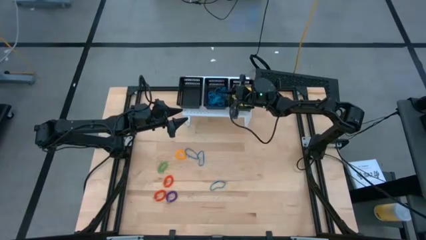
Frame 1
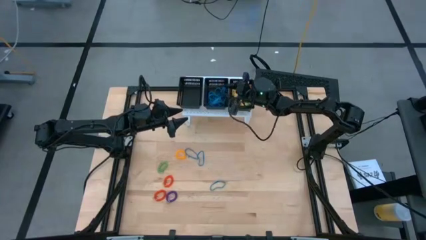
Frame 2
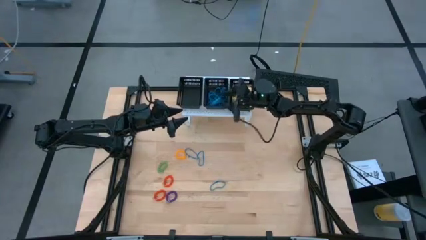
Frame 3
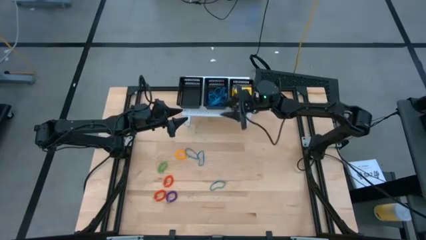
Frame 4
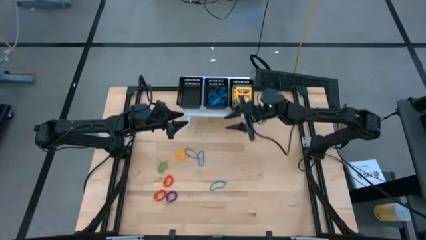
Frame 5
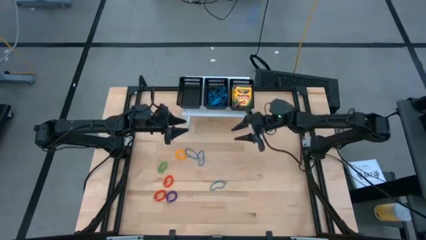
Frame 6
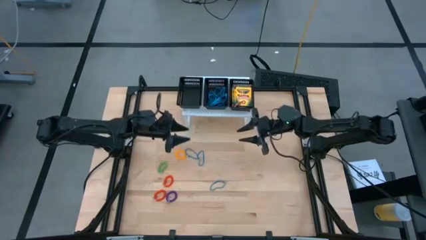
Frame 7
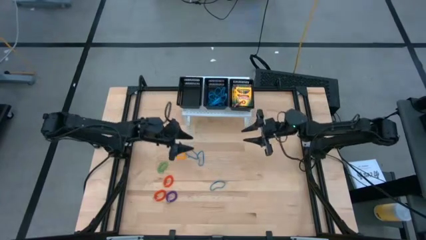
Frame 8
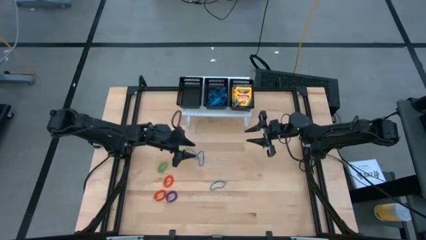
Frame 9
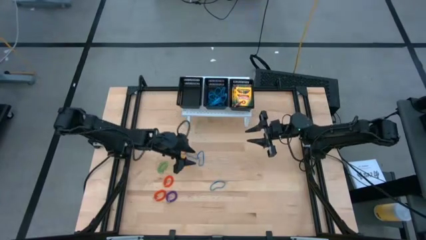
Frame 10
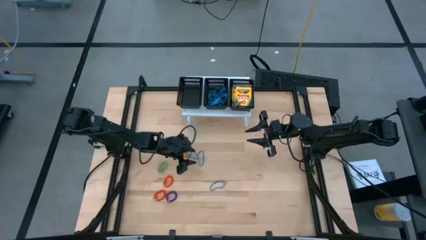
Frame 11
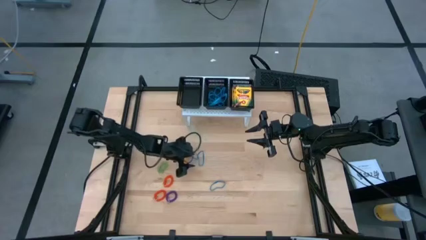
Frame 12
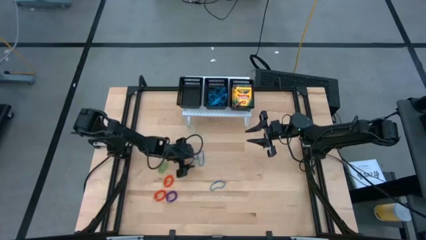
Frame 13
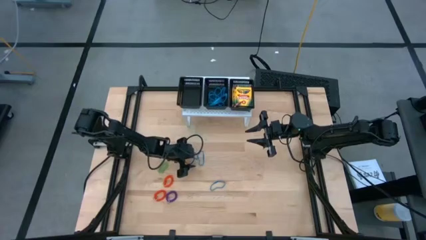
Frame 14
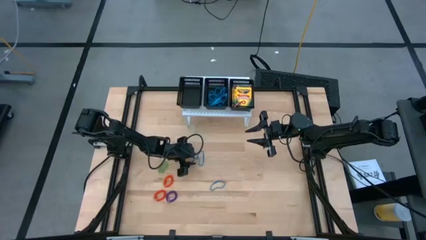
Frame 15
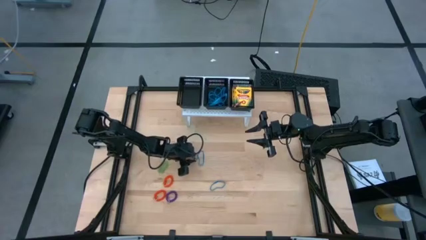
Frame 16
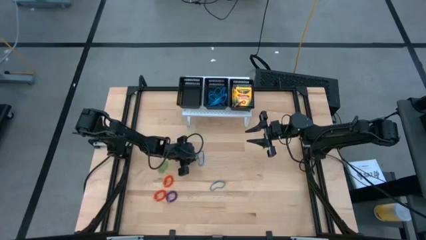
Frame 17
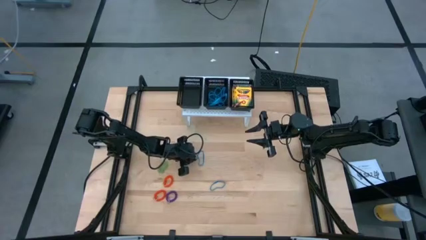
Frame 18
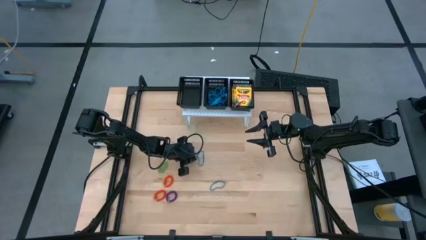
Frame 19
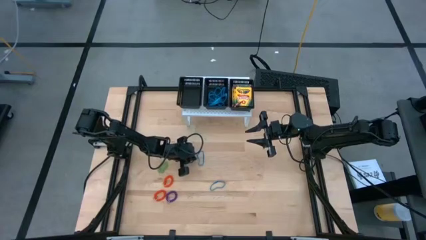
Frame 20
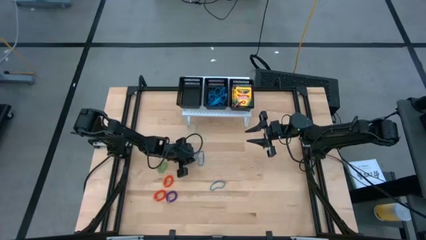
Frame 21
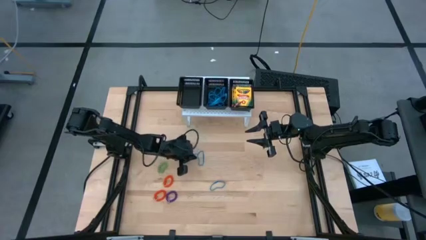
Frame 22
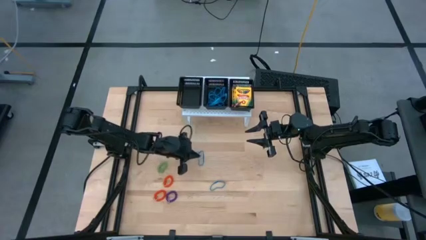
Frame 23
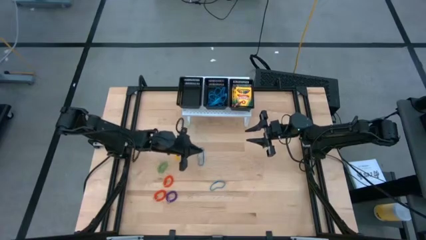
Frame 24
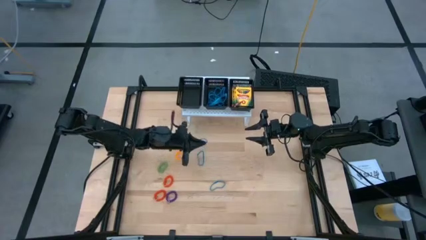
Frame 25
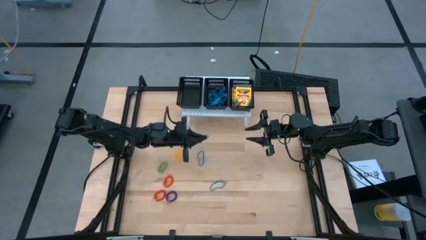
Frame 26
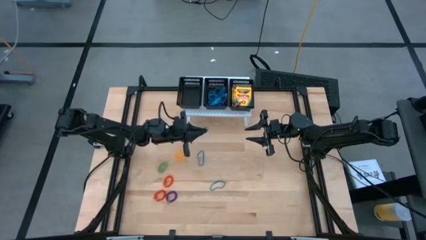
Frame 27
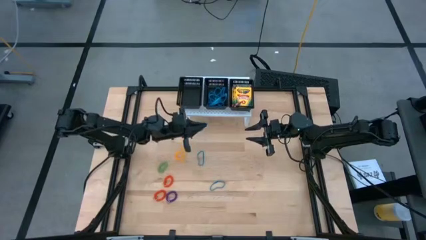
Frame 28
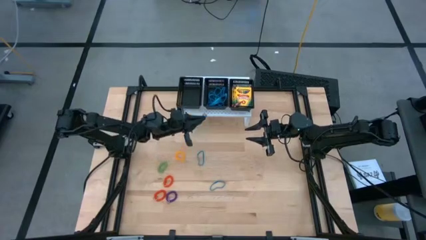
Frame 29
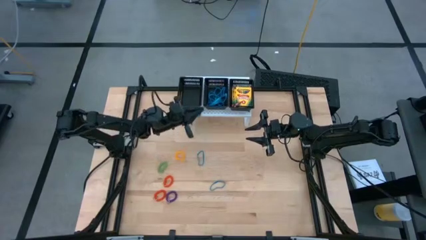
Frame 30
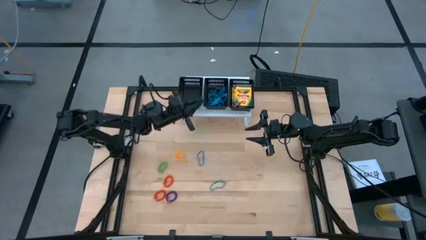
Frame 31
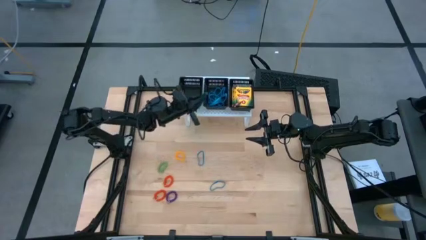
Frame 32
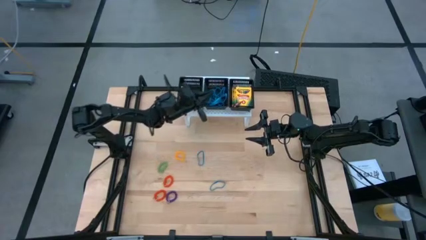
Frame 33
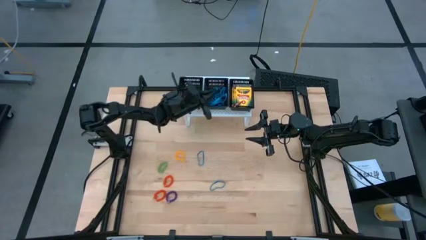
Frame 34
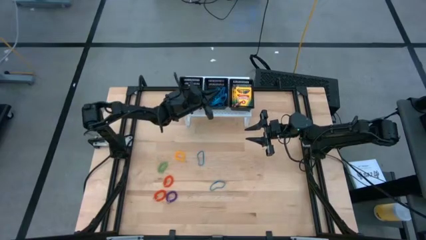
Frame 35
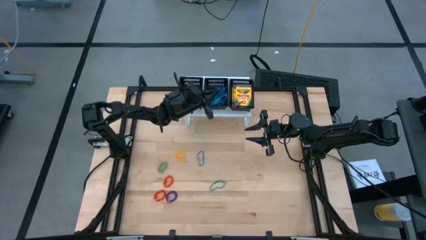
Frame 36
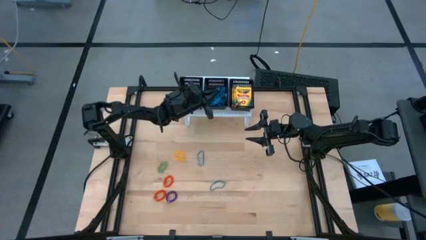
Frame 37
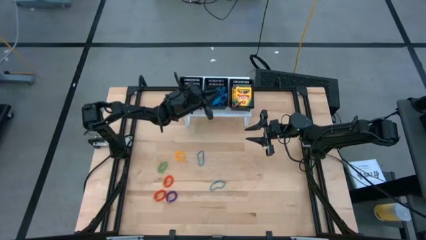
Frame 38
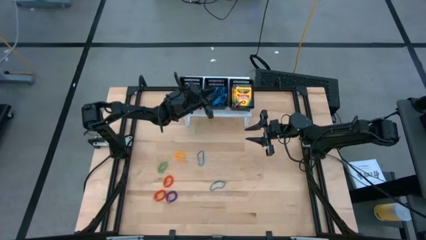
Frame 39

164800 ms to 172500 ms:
Task: Pick & Place Office Desk Supplies
Put the blue rubber band into the middle black bin

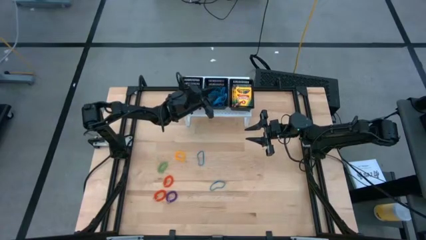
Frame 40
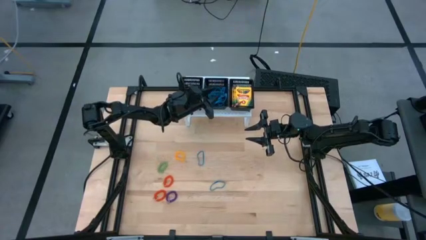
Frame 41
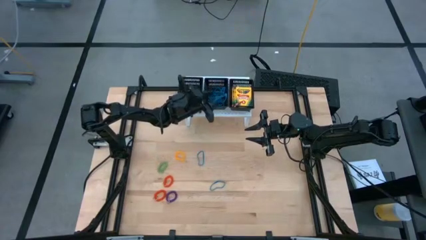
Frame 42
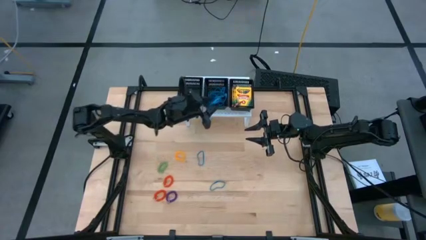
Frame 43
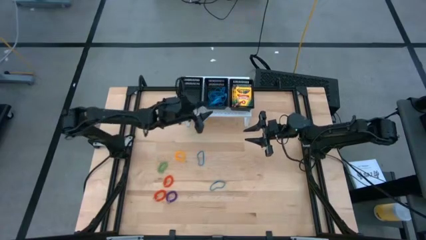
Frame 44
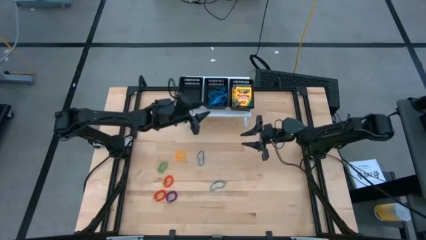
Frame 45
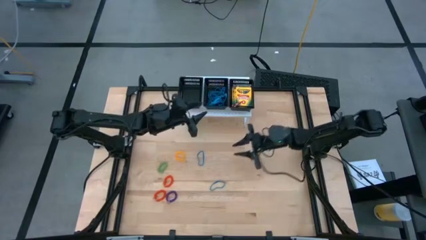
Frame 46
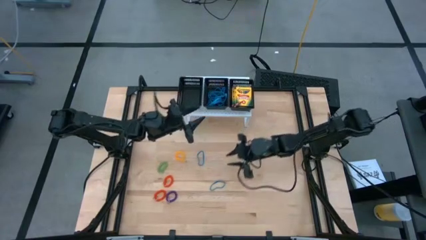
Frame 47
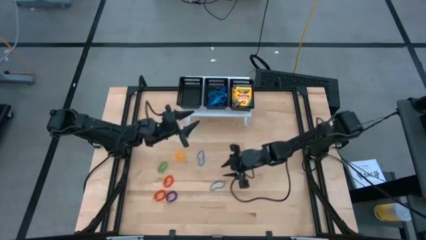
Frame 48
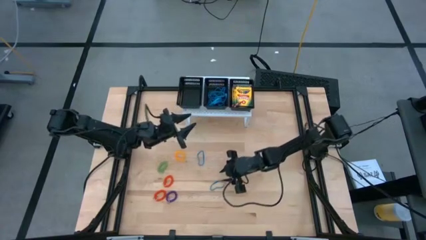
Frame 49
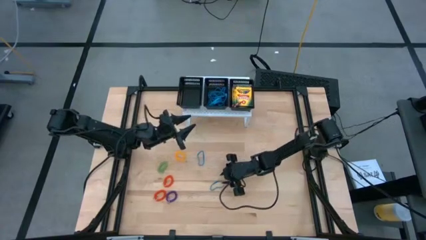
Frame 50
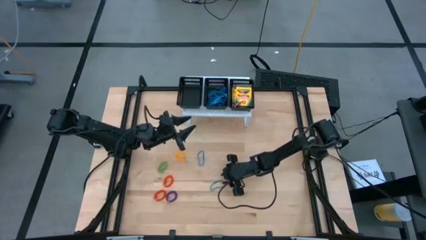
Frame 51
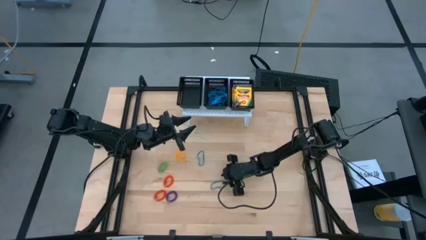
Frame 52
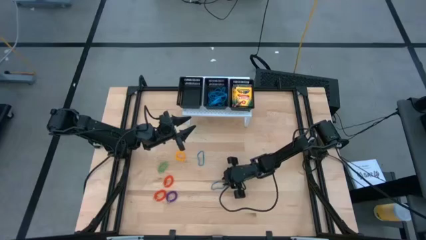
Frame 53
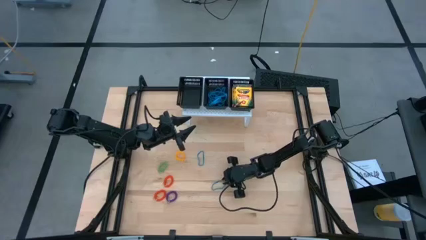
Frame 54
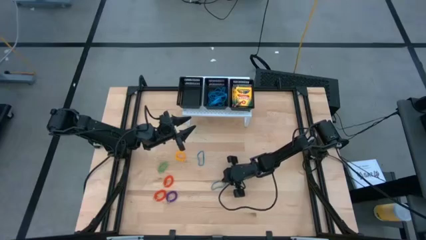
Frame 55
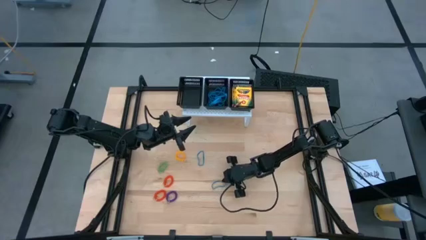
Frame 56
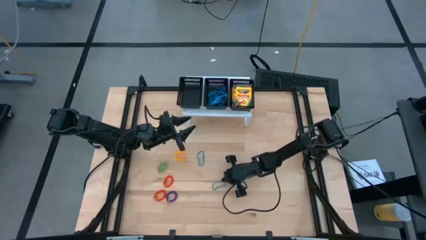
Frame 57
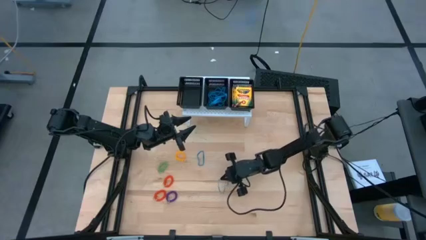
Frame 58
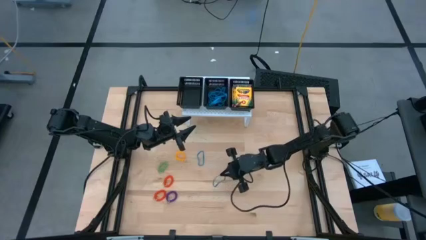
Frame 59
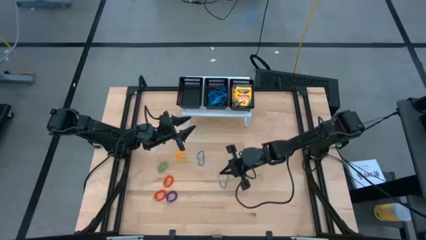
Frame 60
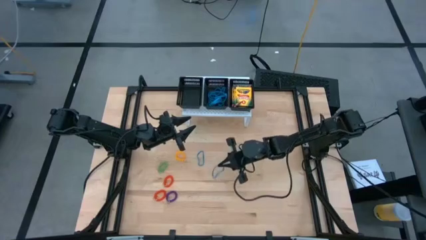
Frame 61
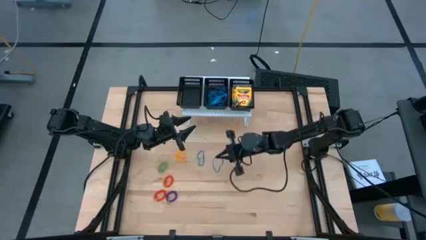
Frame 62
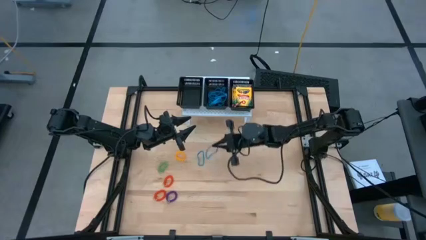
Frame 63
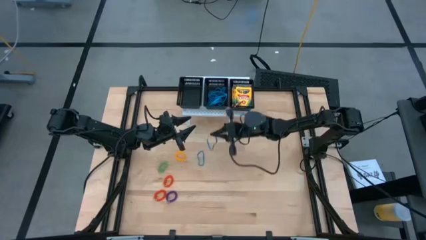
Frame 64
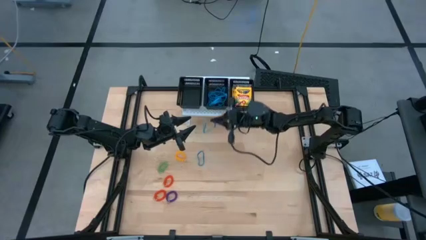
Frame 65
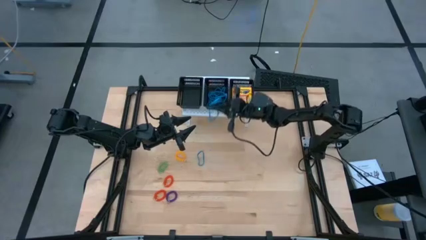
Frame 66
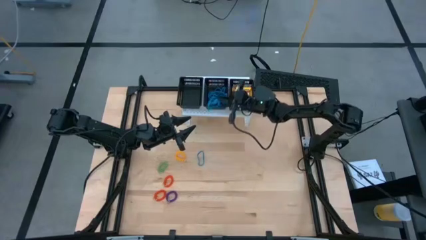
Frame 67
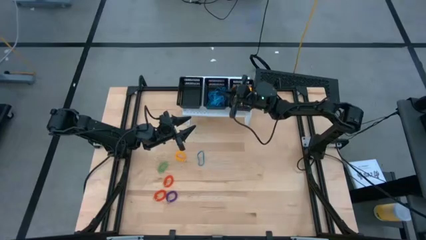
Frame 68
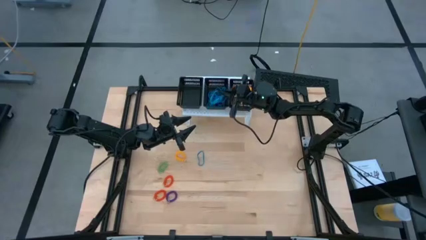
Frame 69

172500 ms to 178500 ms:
Put the blue rubber band into the middle black bin
